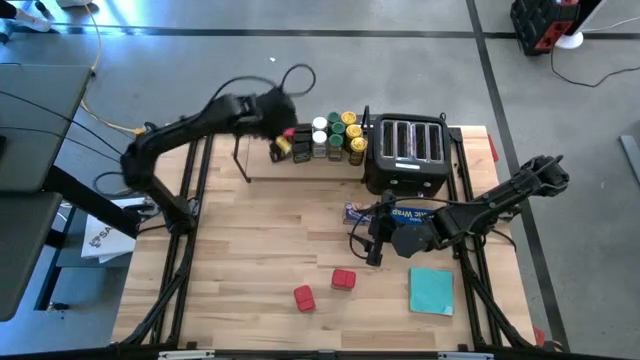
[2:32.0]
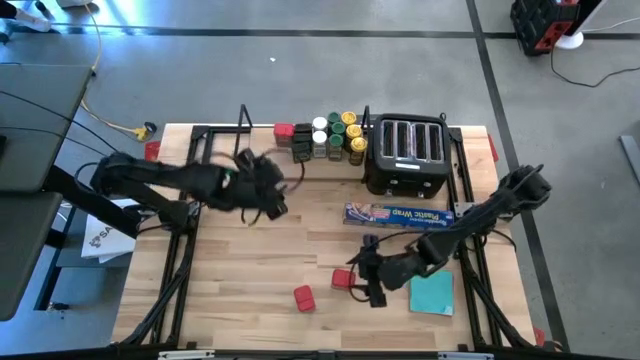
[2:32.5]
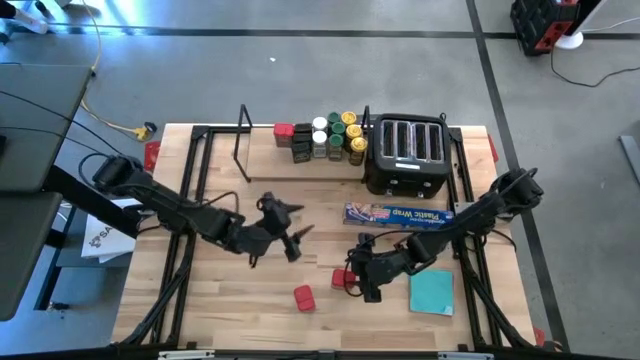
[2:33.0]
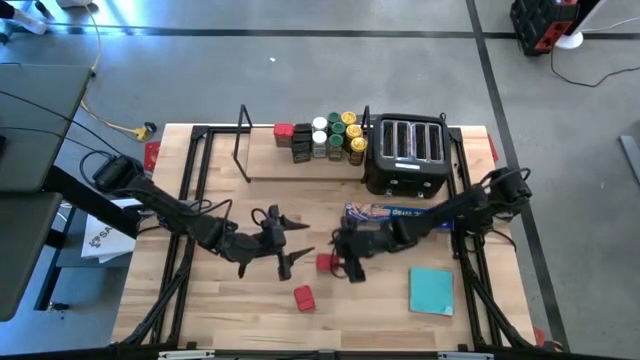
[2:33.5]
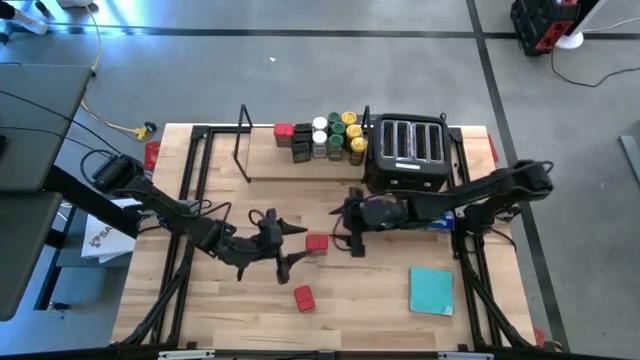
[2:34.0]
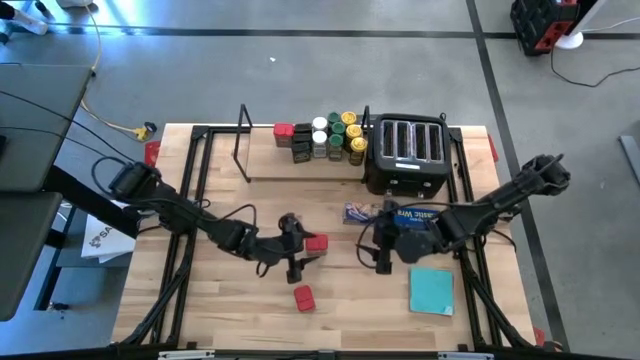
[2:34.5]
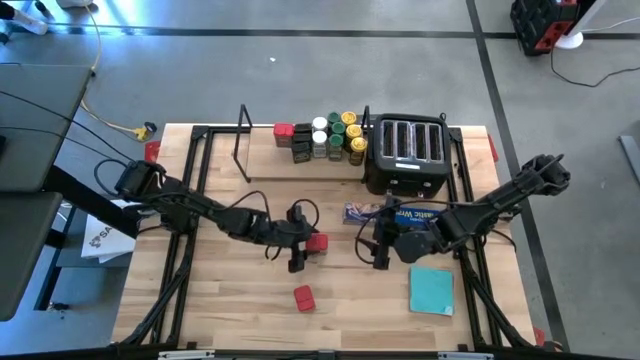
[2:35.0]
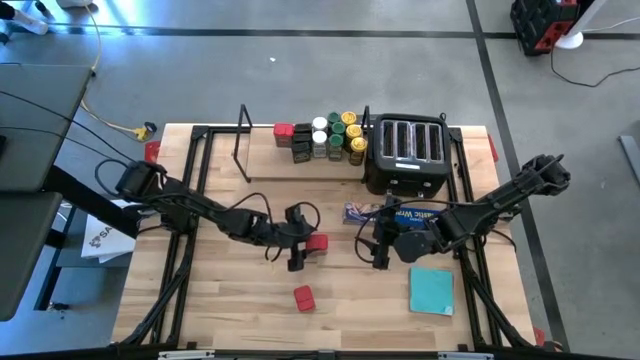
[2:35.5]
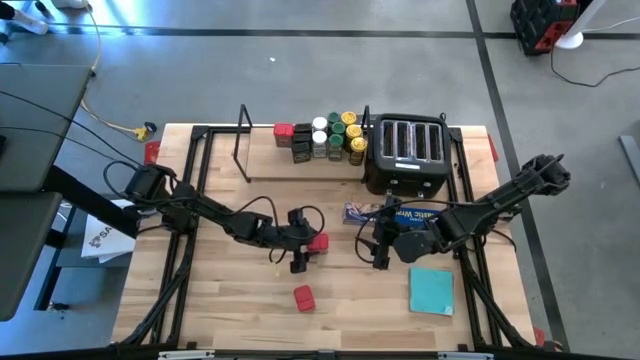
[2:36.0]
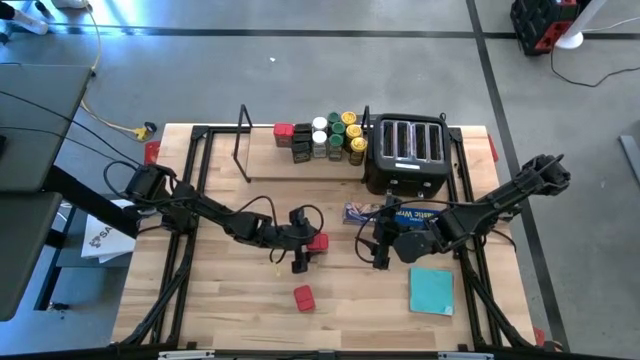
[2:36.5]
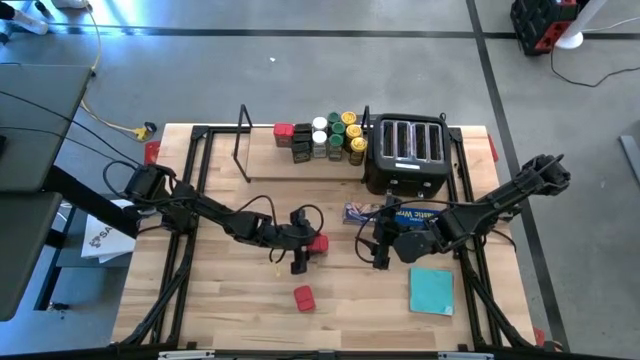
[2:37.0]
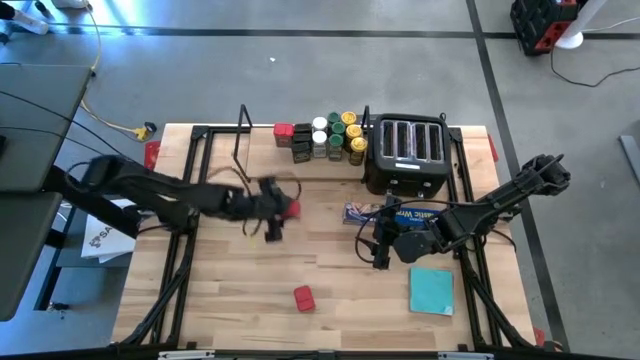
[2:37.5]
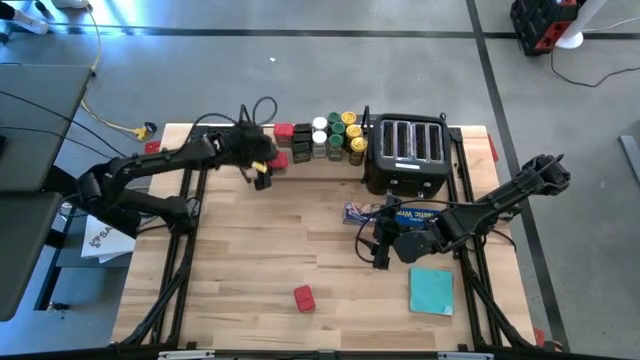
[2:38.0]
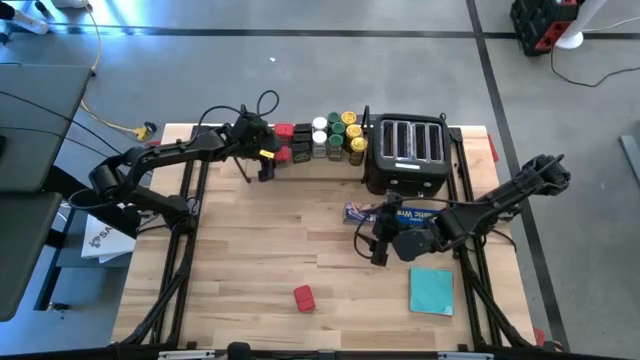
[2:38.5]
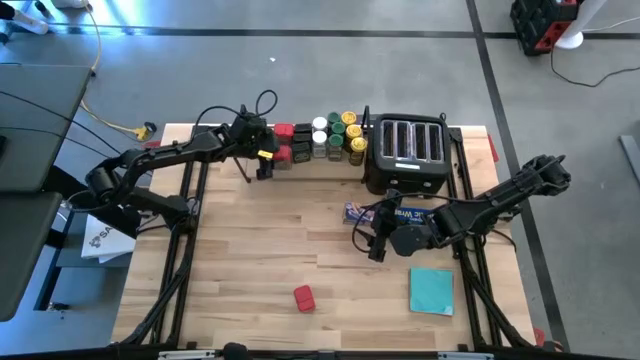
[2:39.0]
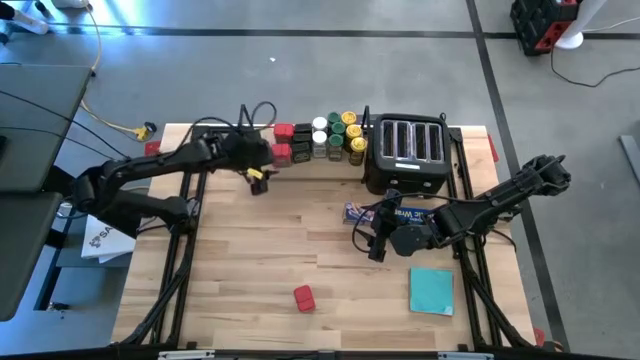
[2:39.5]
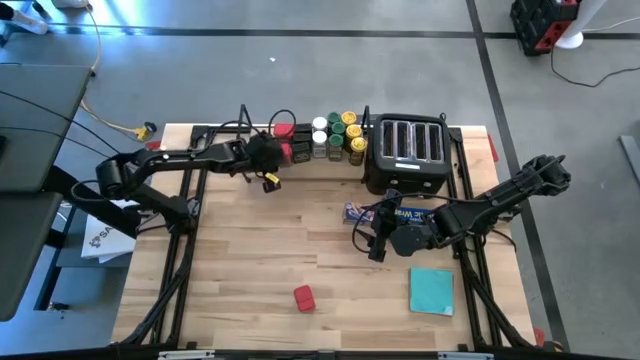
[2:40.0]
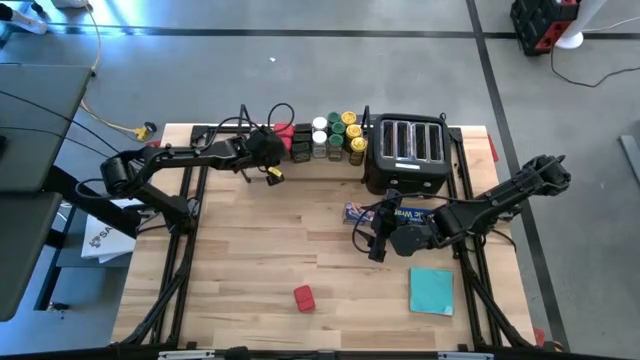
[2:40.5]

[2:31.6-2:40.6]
Task: Shelf spices
Put the right red seasoning can on the shelf aligned with the other red seasoning can

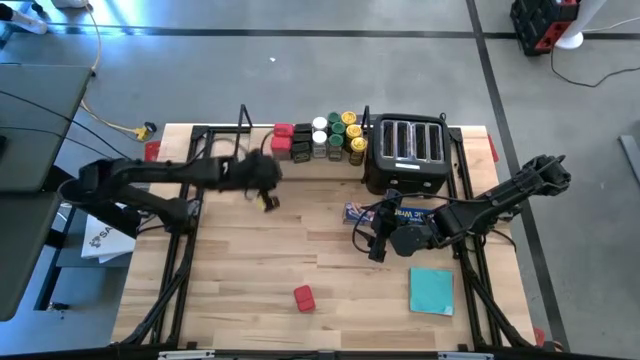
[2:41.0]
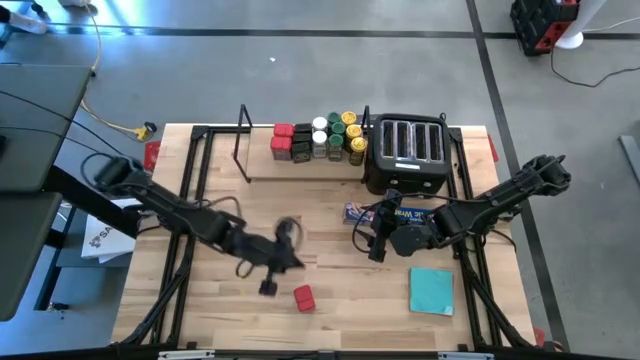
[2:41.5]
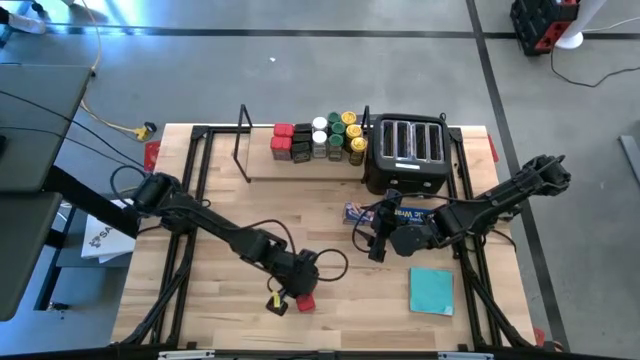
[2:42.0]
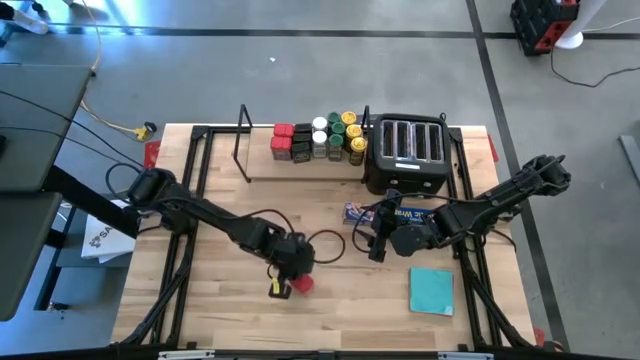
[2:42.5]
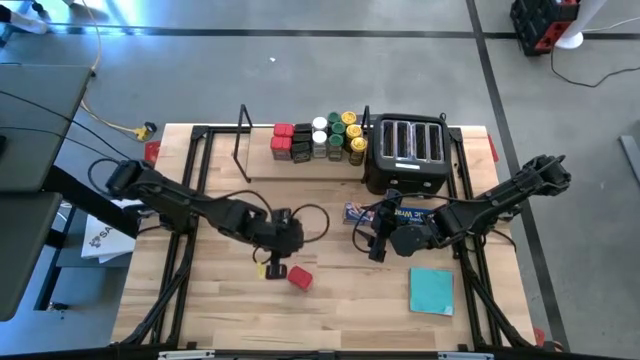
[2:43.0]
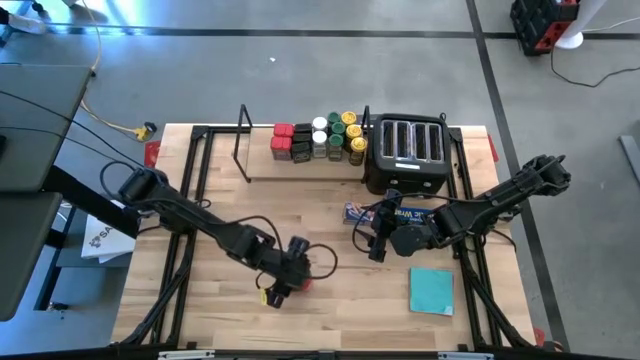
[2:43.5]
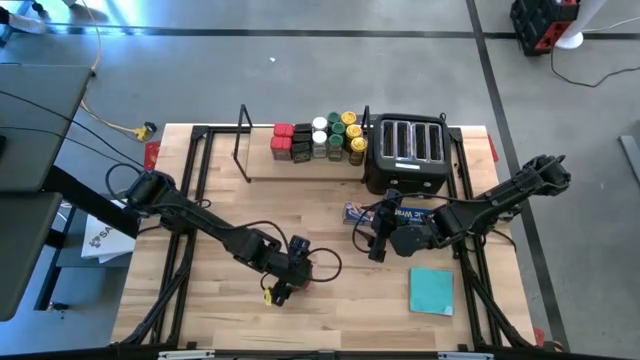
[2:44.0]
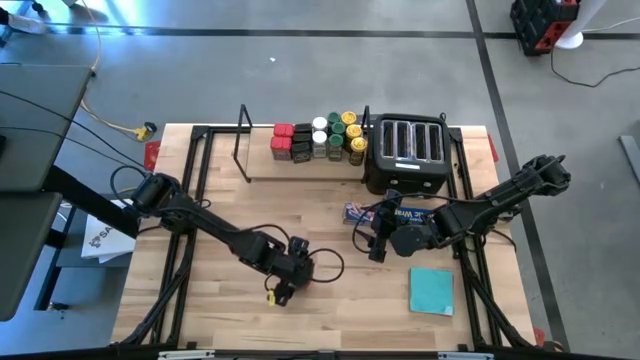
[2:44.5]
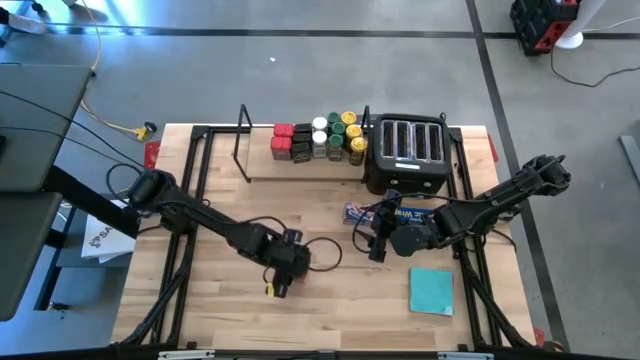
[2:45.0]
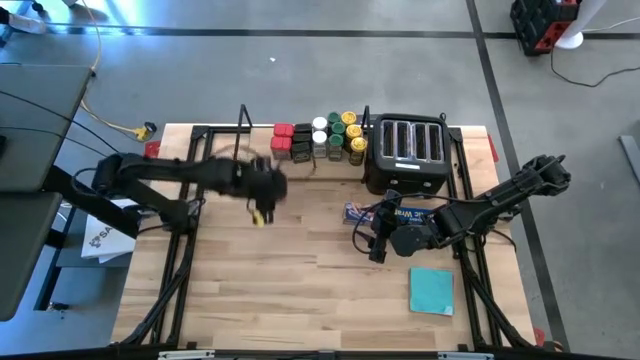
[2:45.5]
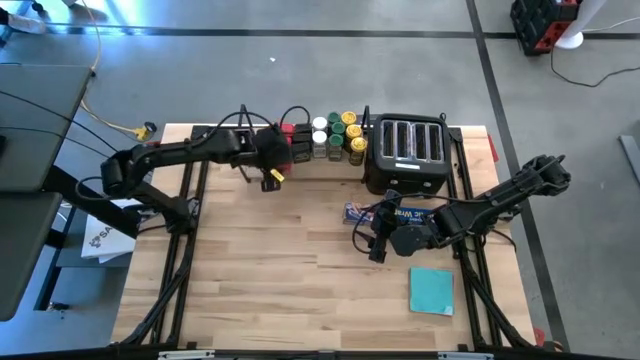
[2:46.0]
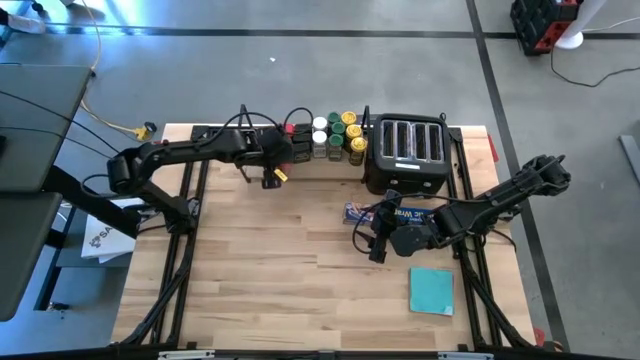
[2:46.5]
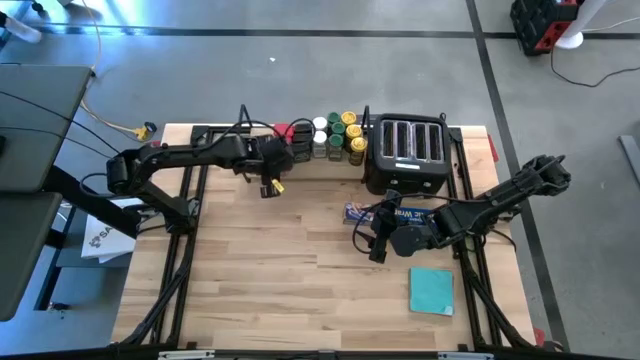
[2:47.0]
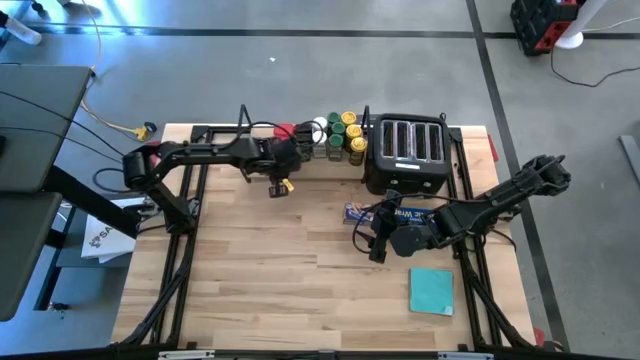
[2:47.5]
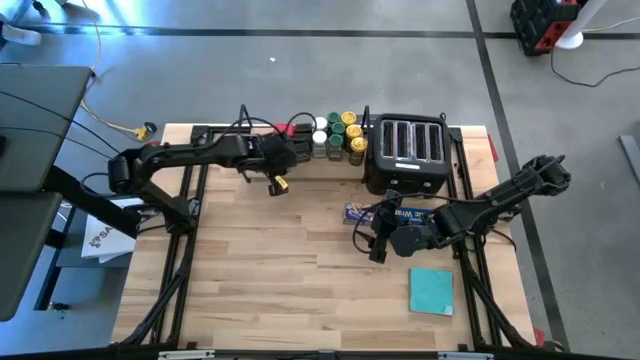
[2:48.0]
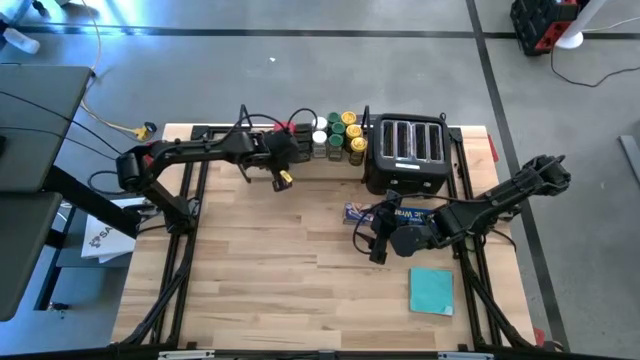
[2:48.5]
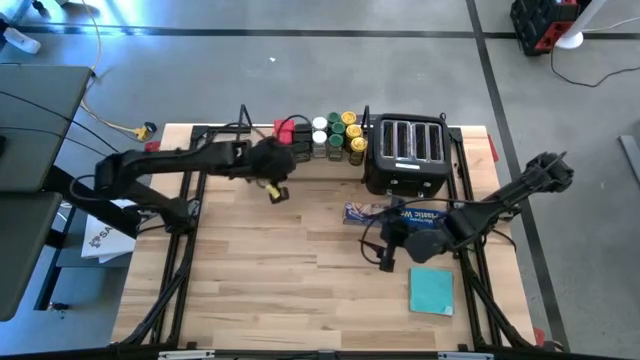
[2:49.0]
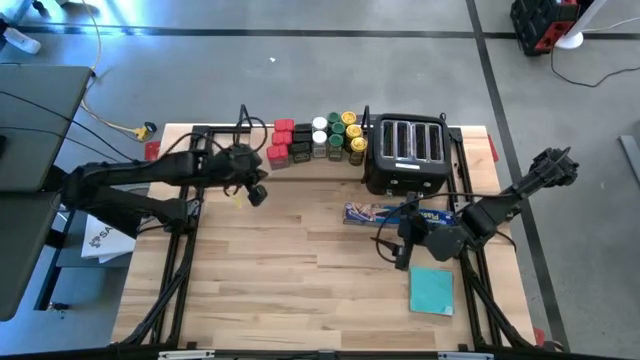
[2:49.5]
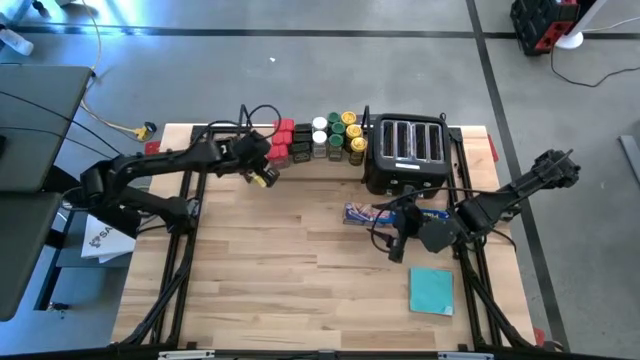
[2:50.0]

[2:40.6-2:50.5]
Put the red seasoning can on the shelf aligned with the other red seasoning can

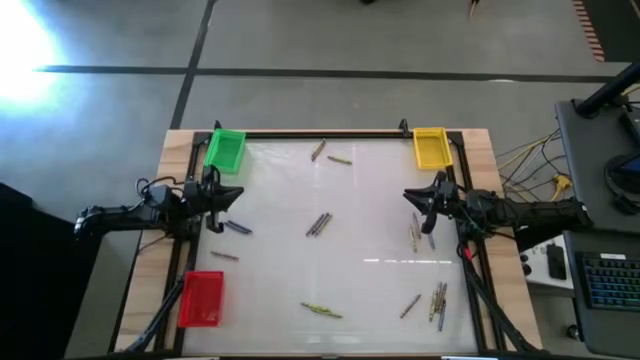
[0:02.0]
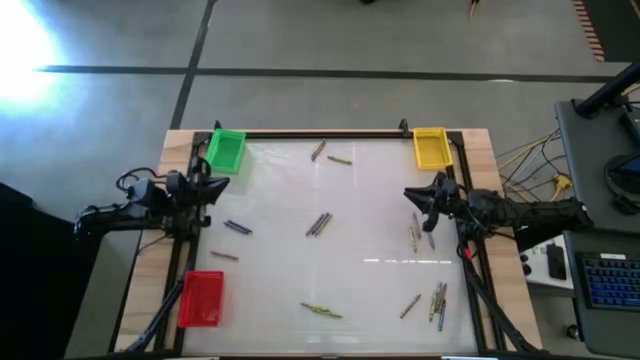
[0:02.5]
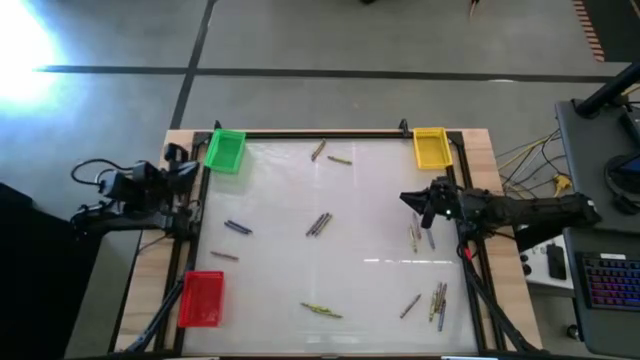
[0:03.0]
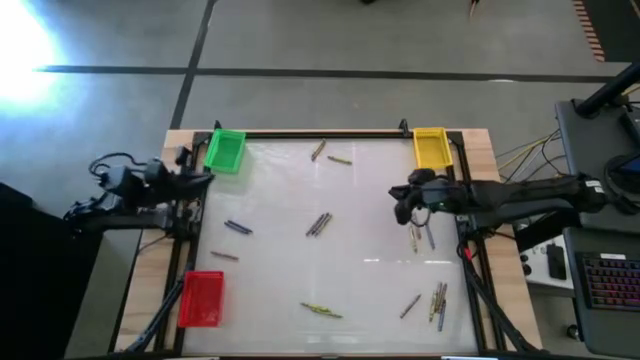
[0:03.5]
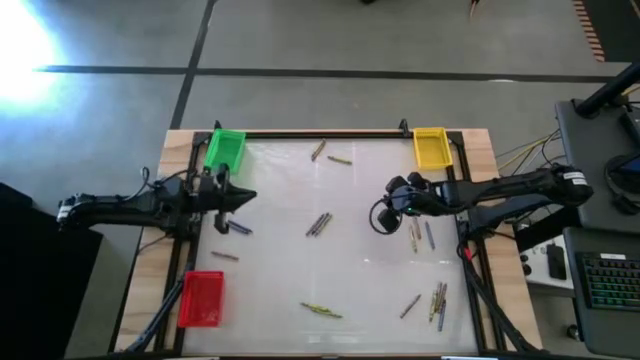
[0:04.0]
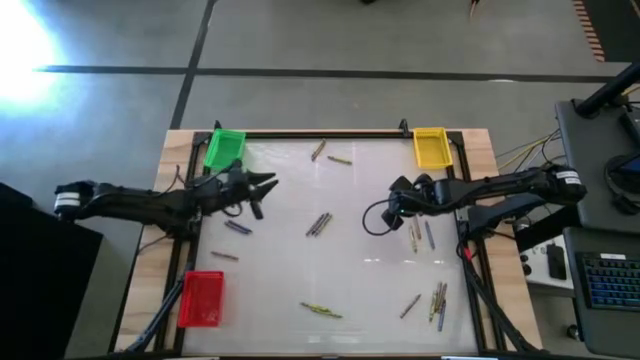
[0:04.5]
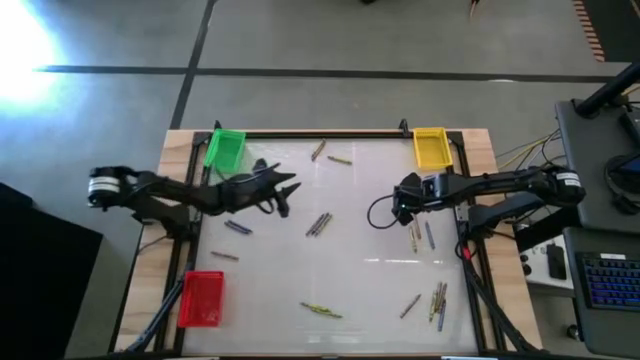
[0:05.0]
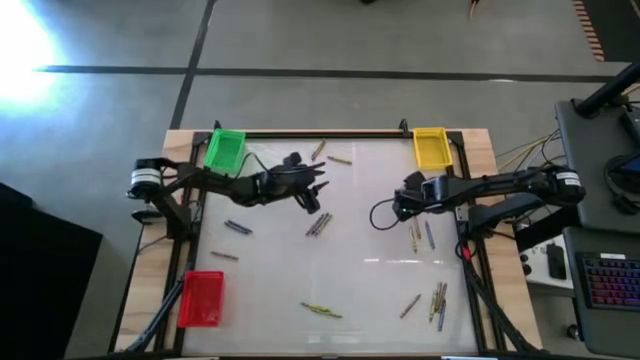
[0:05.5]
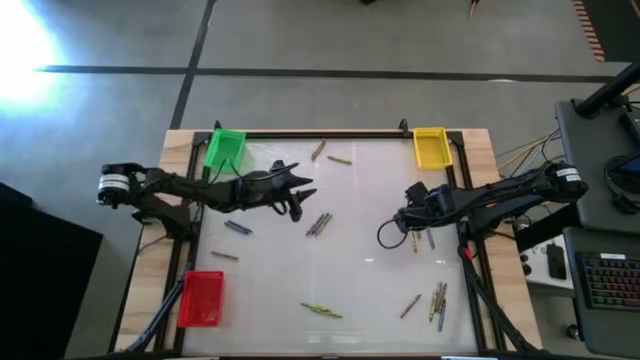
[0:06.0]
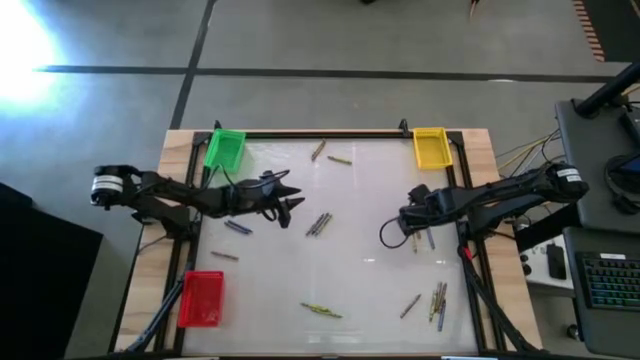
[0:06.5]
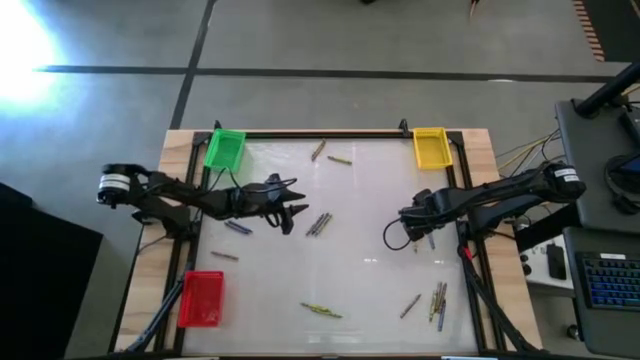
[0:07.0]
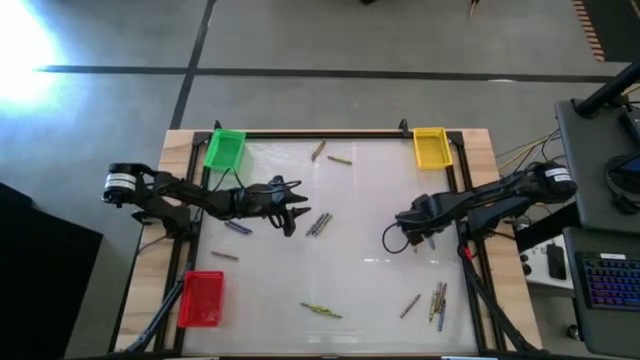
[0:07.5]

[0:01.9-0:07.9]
Task: Sort crayons
Put the blue crayon into the yellow basket
